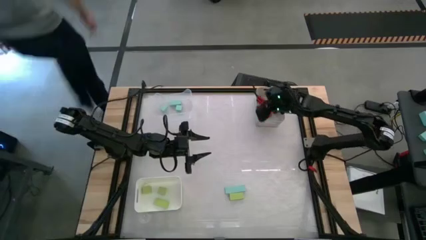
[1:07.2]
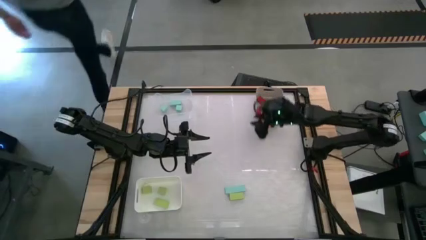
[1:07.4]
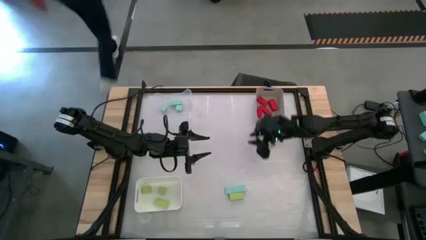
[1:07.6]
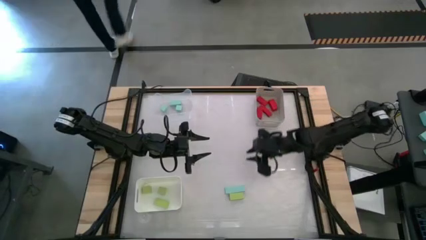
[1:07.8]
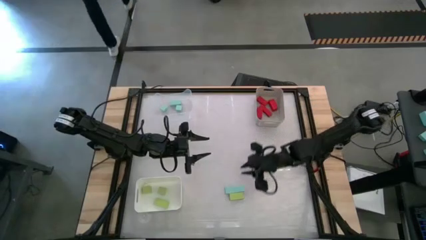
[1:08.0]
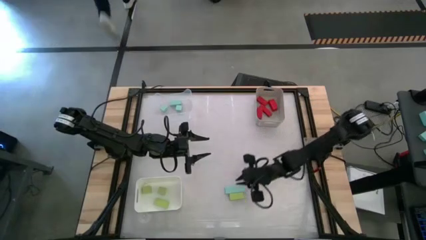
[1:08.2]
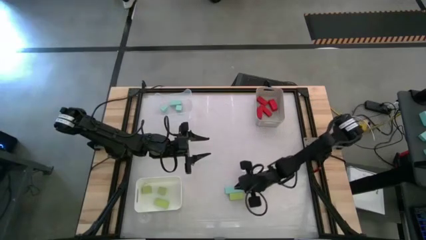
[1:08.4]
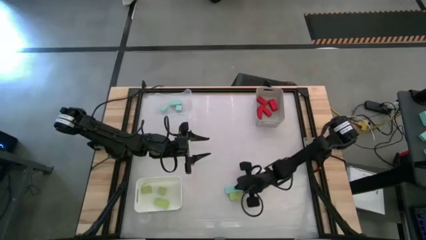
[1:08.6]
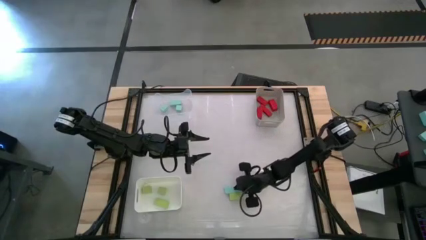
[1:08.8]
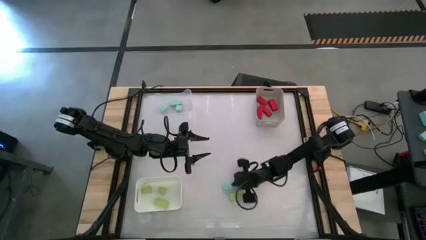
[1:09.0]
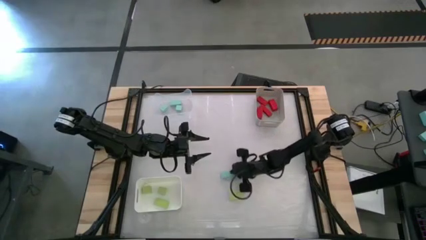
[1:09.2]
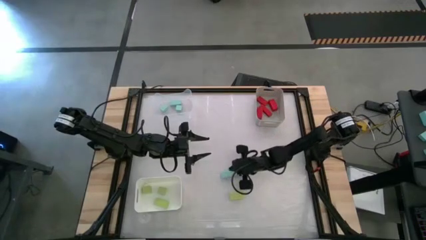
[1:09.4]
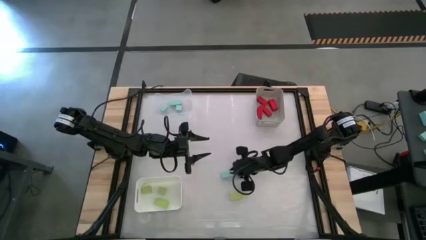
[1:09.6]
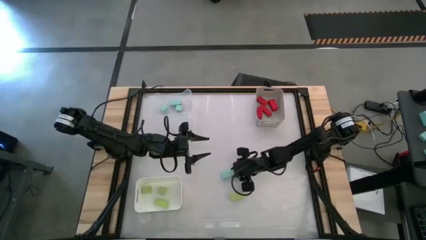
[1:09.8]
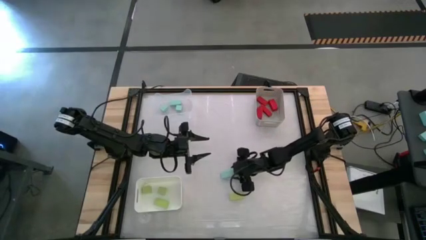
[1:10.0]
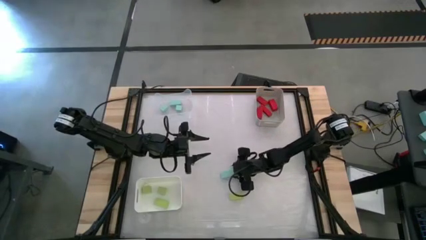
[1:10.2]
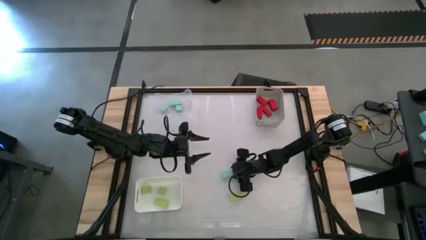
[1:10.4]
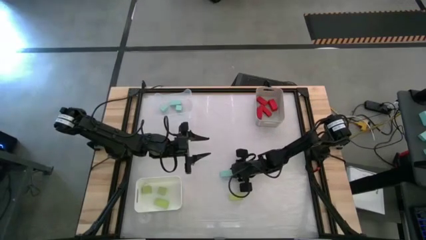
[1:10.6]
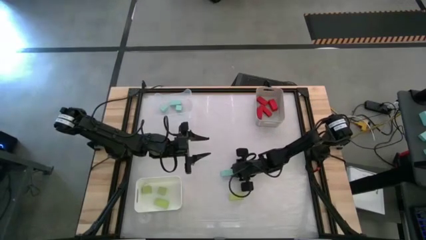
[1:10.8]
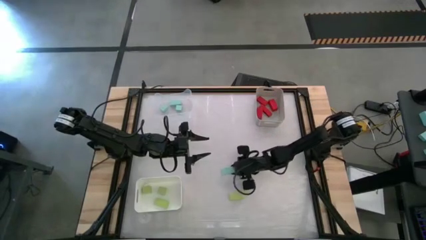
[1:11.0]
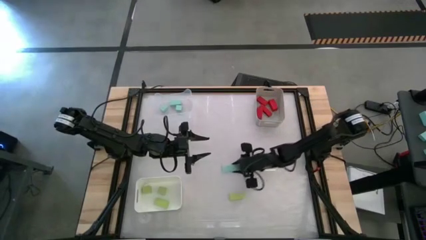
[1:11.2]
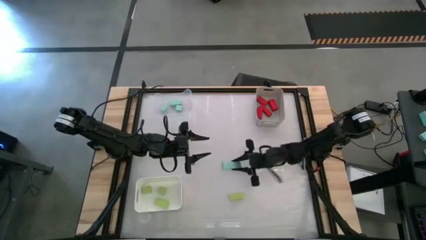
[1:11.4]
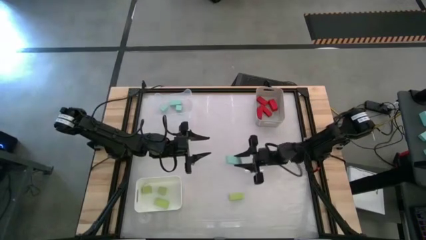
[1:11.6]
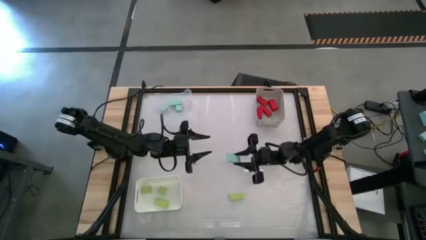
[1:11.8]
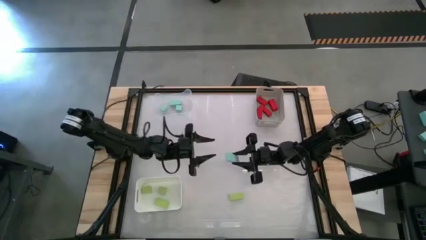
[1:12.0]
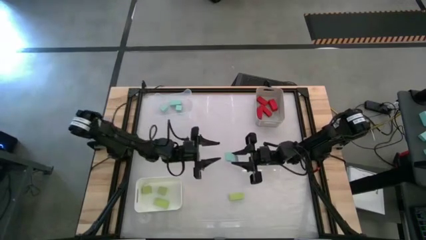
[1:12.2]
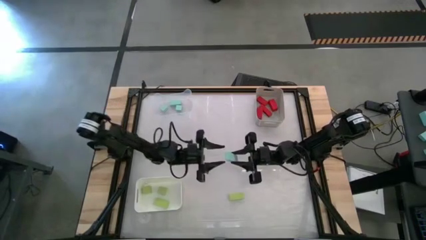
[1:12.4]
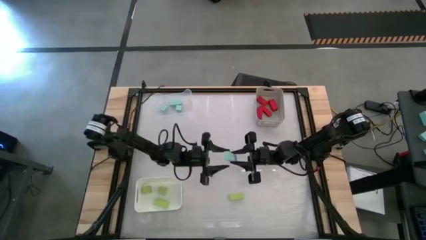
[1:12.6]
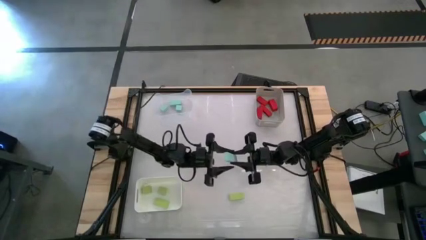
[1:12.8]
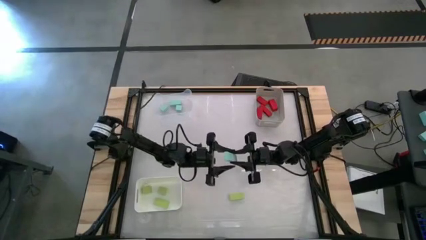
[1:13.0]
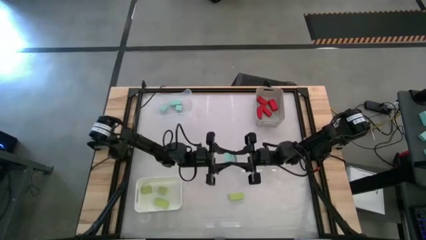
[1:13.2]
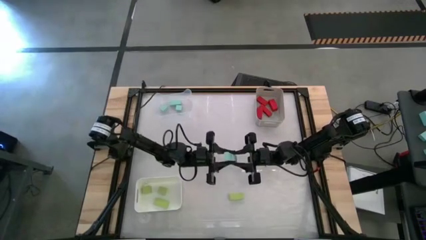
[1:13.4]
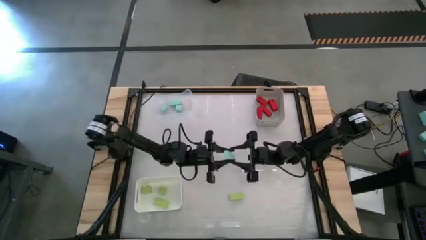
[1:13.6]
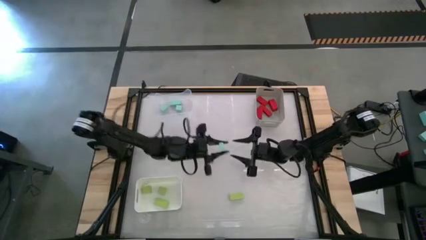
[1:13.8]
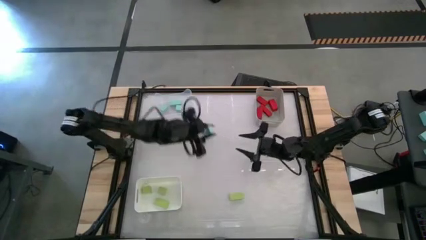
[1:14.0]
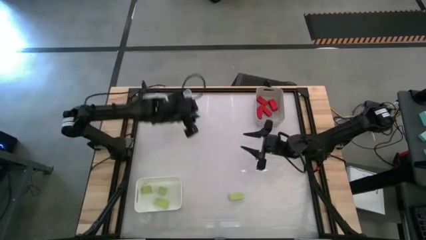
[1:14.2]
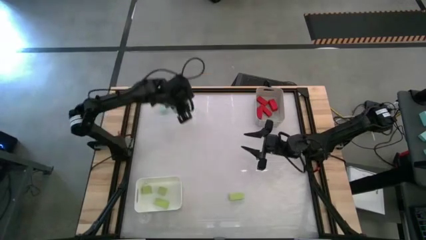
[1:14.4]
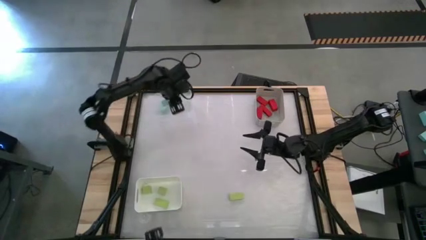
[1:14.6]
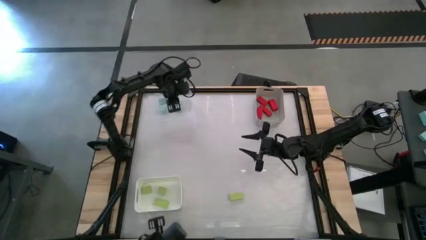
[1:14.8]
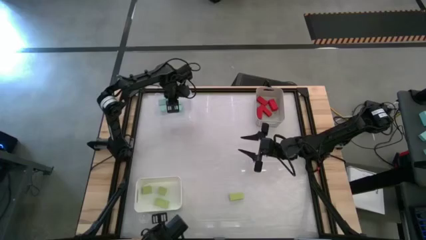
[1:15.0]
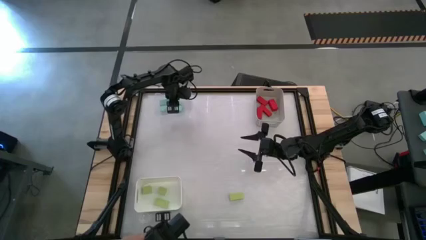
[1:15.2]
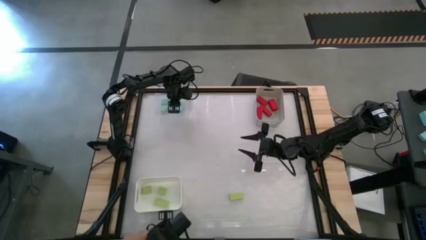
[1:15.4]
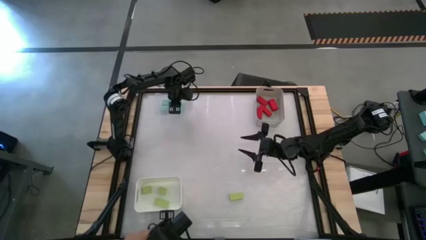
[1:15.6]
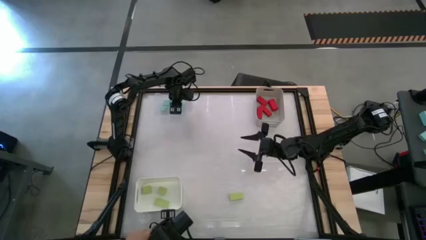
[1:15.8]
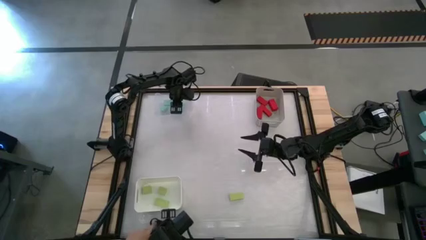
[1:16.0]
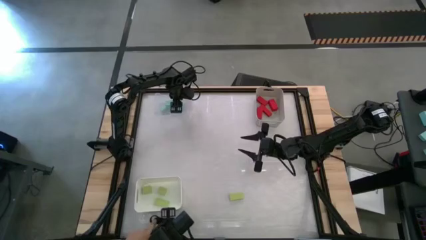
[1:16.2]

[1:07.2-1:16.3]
Task: Sort & place blocks by color
Put the blue block into the transparent bin

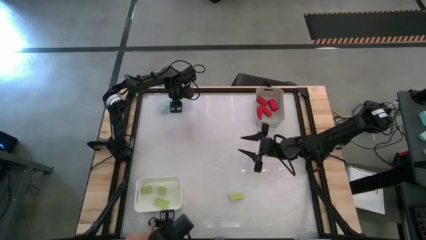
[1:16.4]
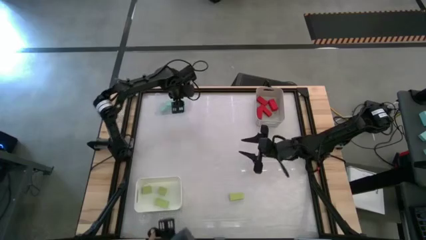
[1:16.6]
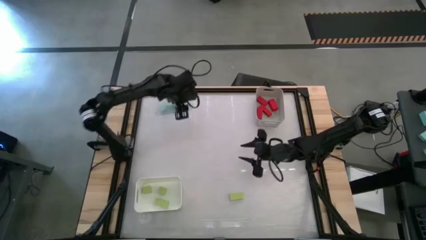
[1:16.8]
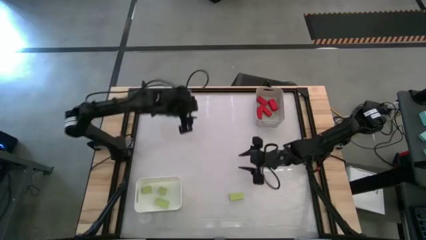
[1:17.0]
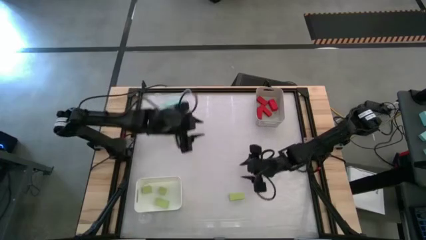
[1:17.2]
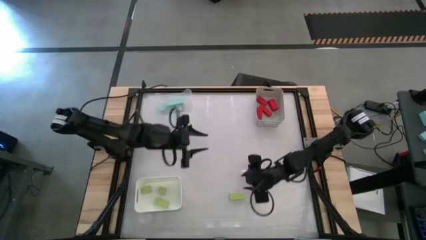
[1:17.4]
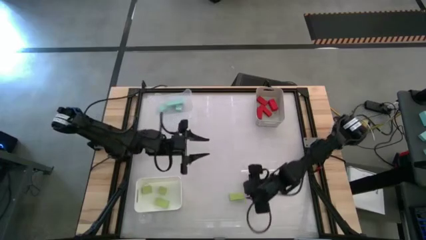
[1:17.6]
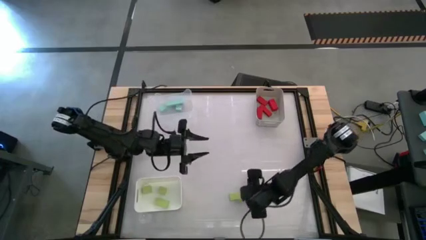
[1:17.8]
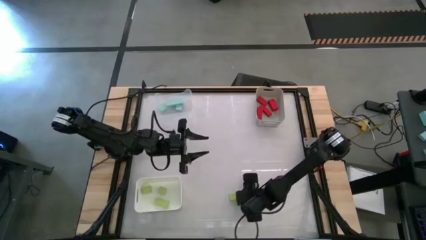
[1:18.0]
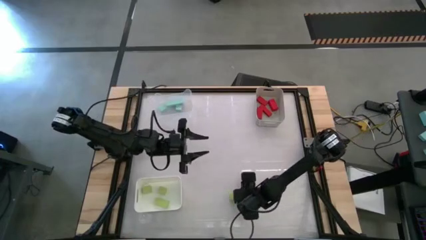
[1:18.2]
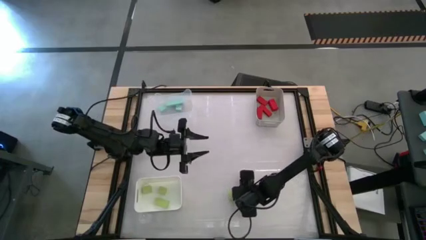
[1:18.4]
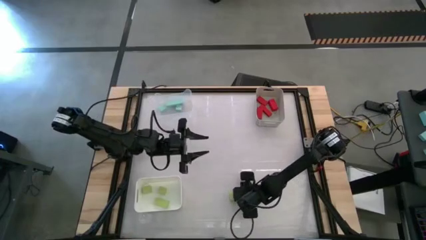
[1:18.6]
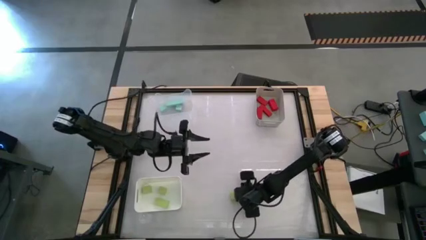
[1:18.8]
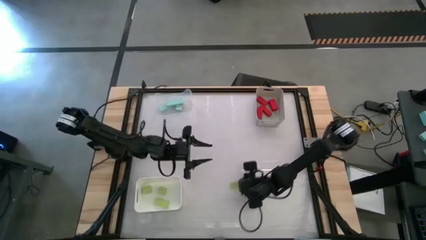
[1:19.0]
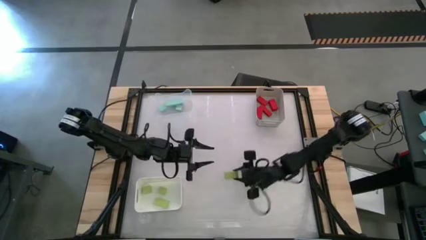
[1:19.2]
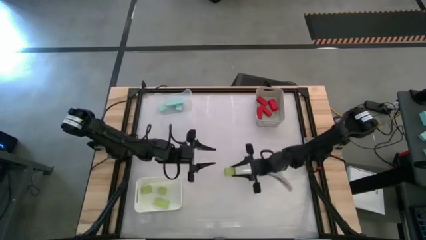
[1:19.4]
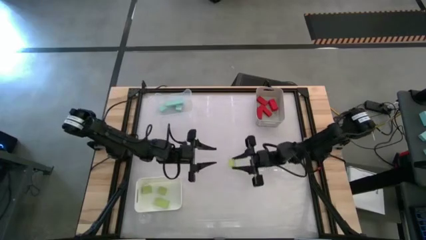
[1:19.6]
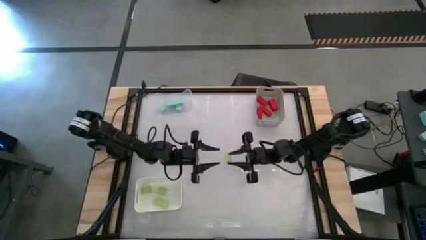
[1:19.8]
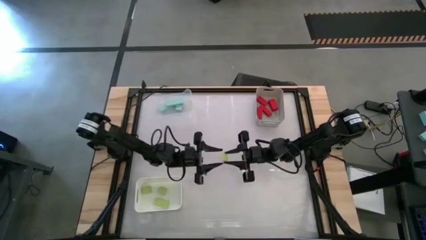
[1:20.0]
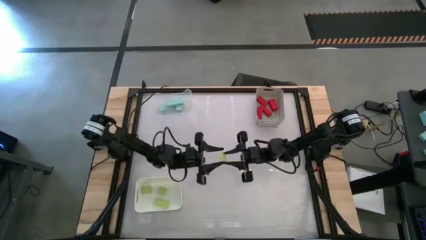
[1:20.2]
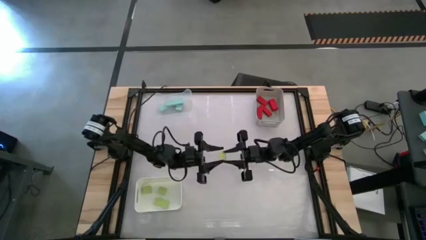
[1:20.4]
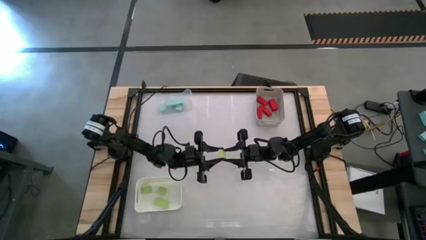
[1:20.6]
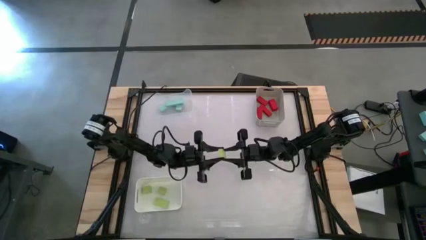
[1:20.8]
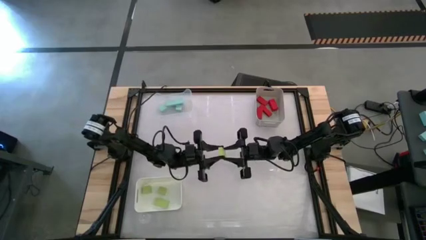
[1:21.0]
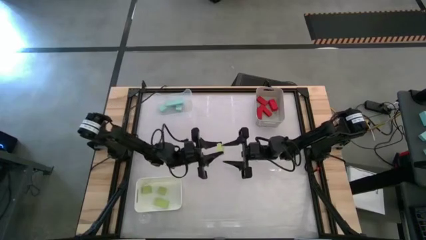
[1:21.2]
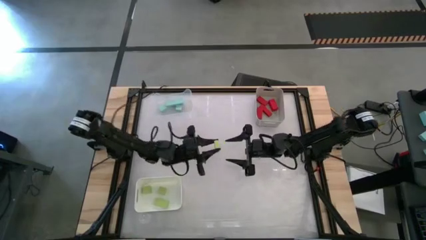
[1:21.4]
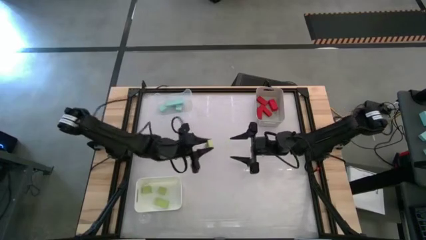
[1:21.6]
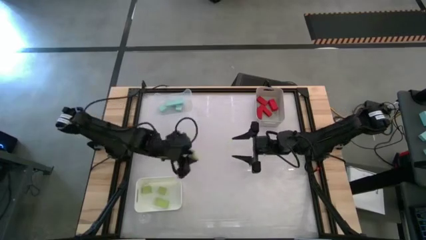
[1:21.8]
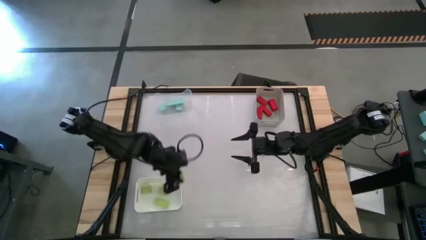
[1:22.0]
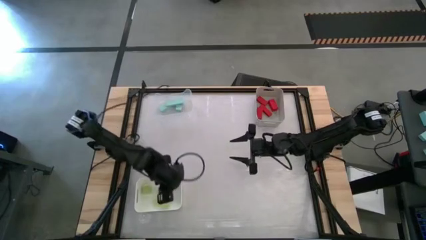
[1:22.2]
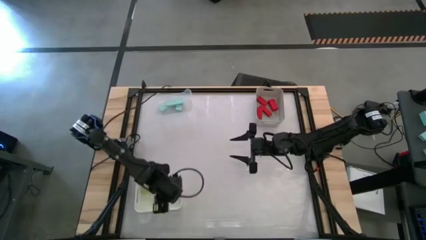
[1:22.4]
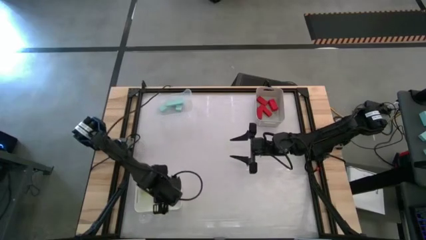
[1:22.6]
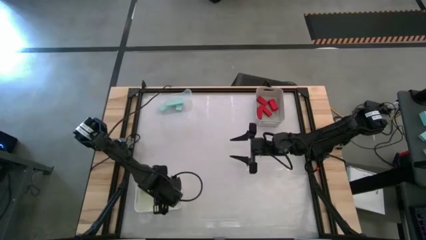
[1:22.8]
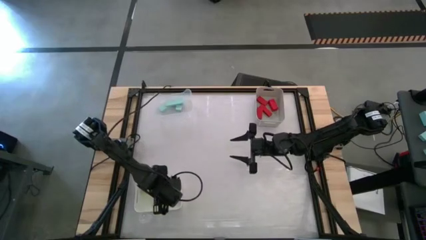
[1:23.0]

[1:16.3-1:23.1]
Put the green block into the white bin

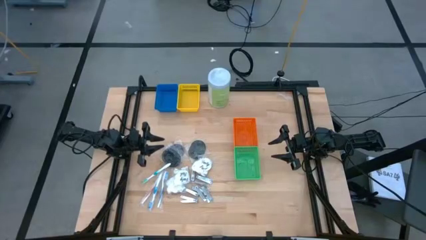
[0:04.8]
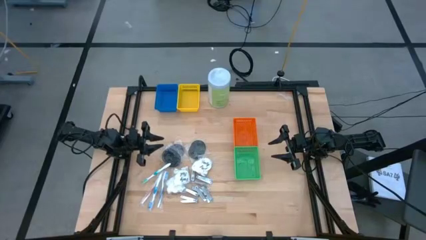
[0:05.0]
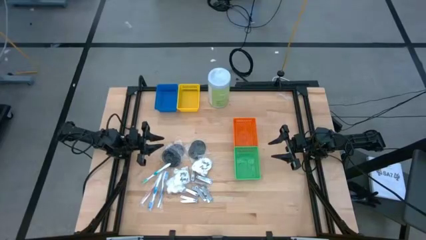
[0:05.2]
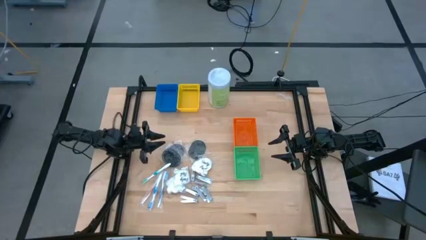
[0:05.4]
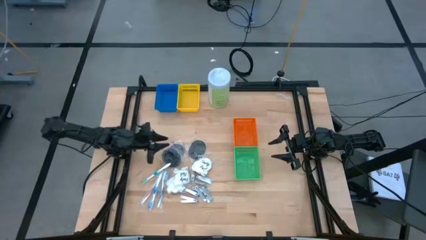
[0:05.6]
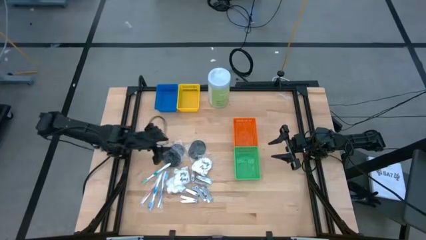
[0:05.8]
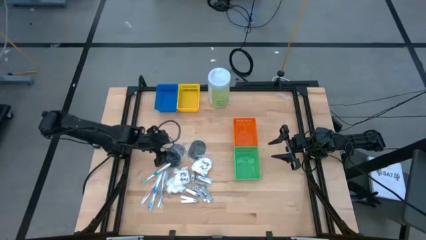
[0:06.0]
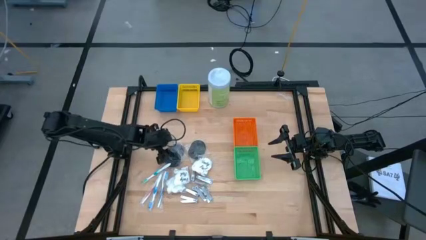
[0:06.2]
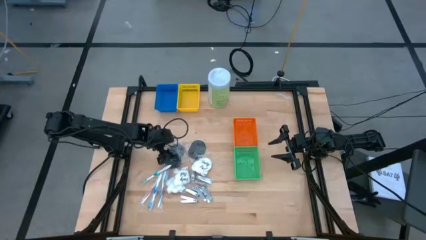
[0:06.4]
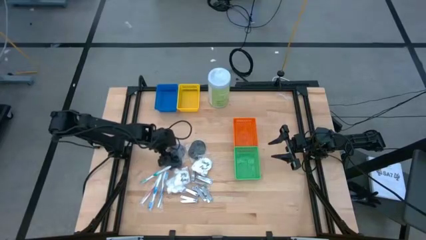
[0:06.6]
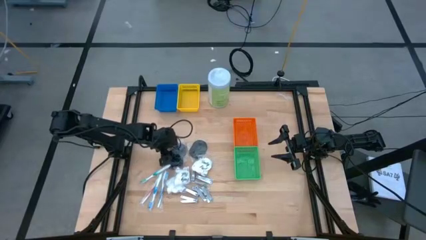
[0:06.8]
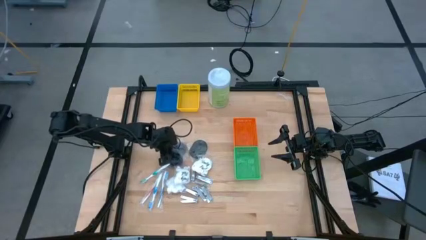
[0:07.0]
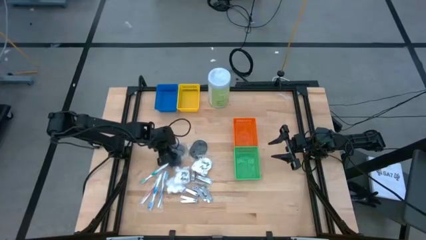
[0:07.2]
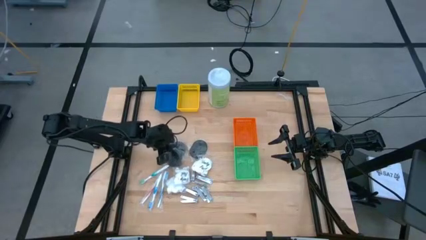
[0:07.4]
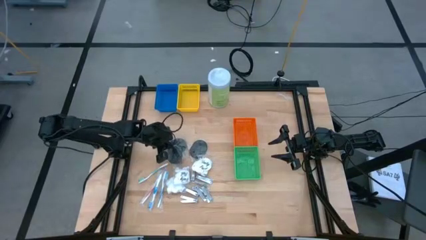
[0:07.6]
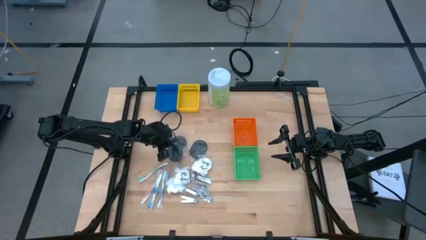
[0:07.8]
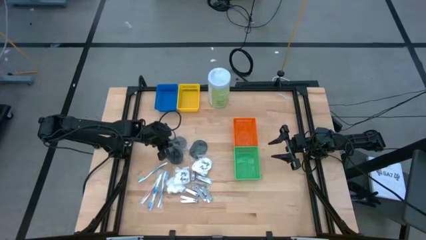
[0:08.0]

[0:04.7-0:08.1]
Task: Pick & Place Travel size toiletries
Put the black hairbrush into the blue bin
